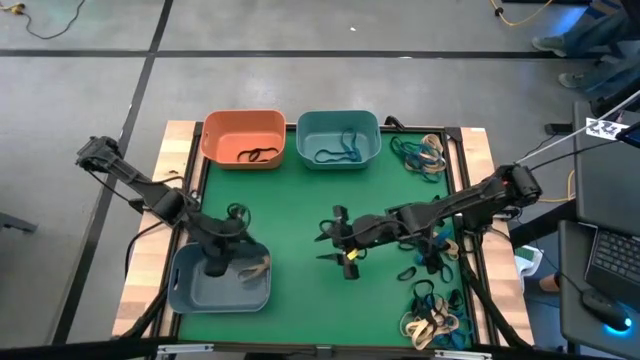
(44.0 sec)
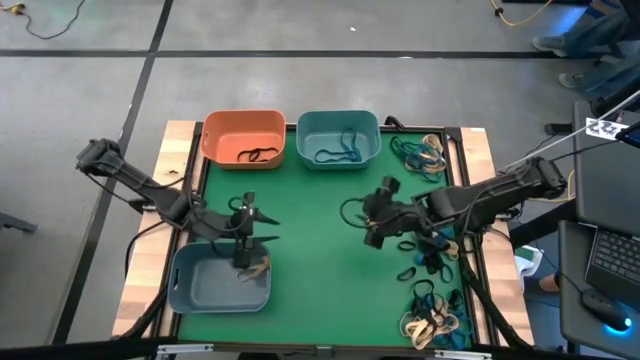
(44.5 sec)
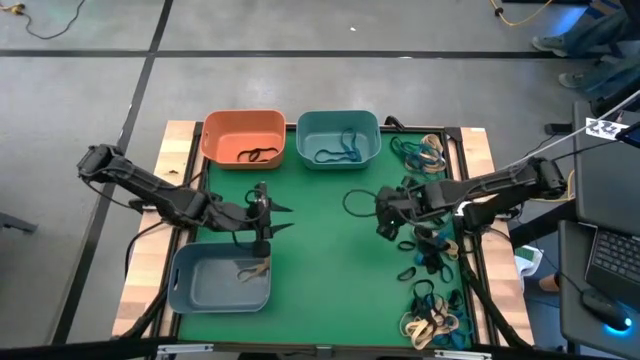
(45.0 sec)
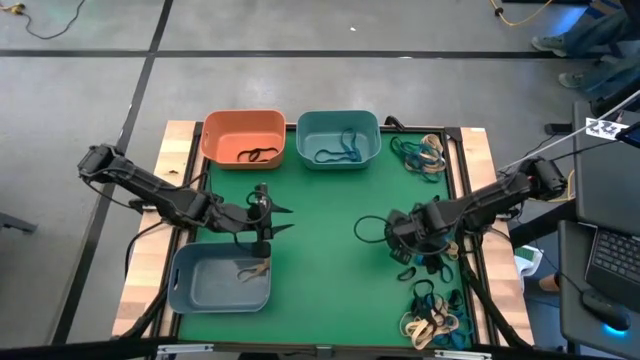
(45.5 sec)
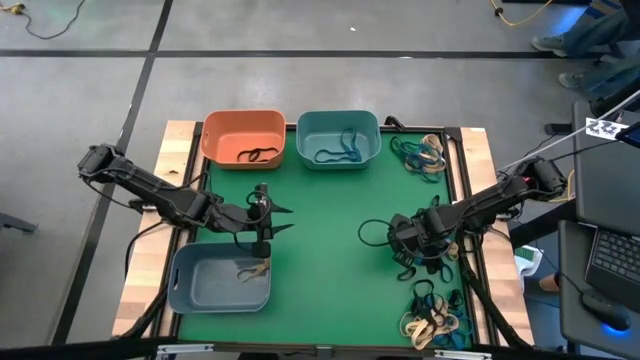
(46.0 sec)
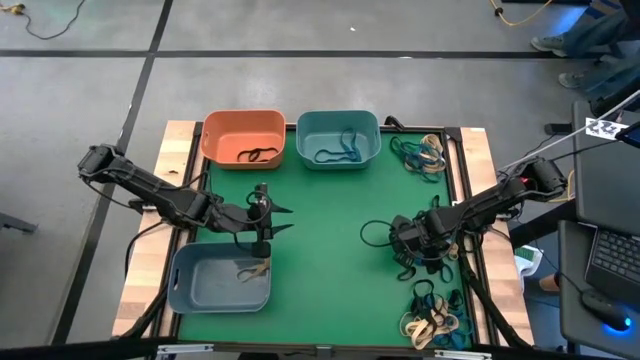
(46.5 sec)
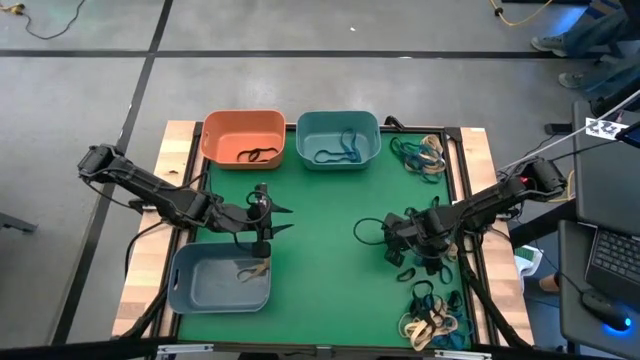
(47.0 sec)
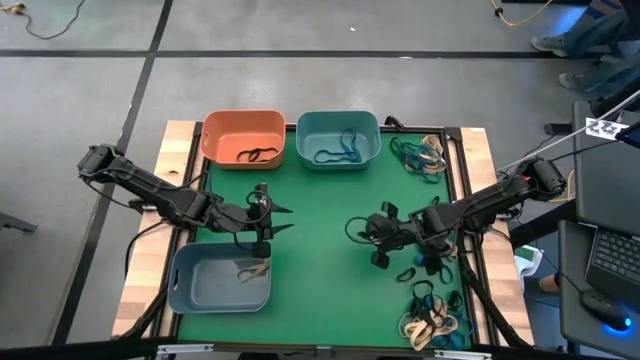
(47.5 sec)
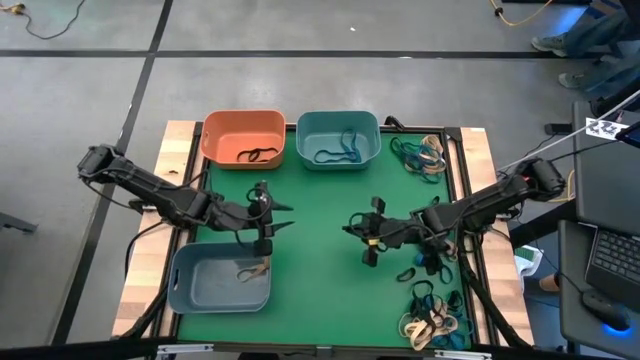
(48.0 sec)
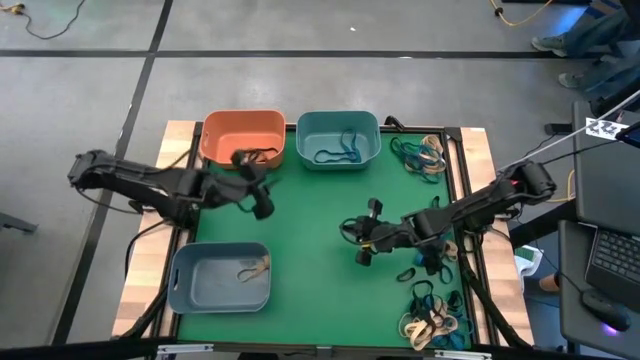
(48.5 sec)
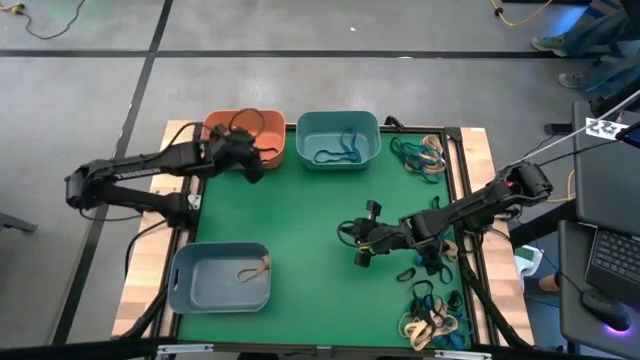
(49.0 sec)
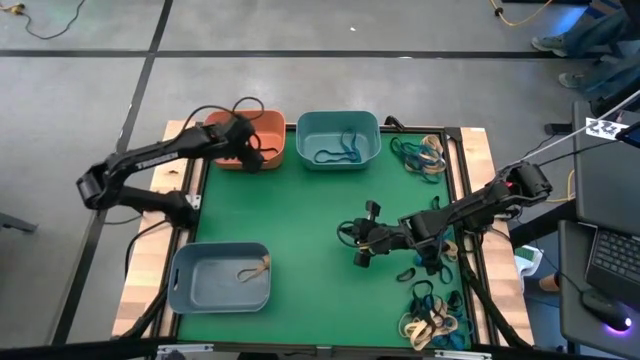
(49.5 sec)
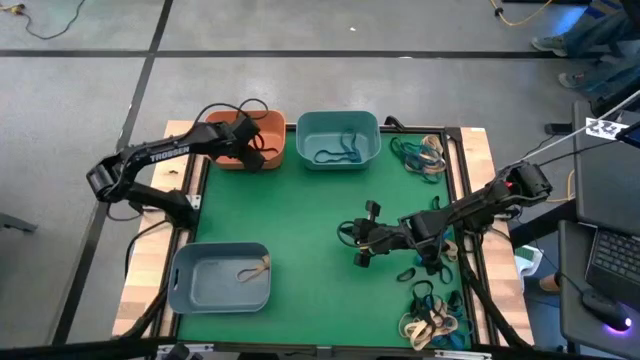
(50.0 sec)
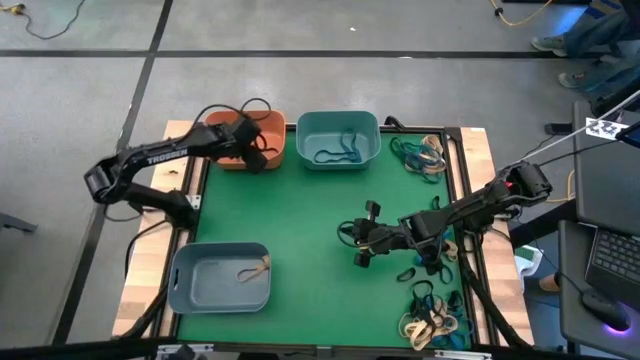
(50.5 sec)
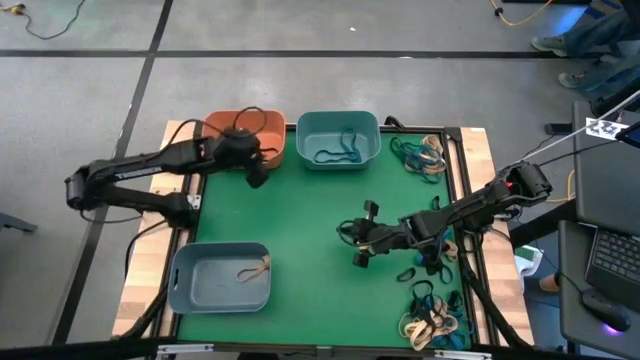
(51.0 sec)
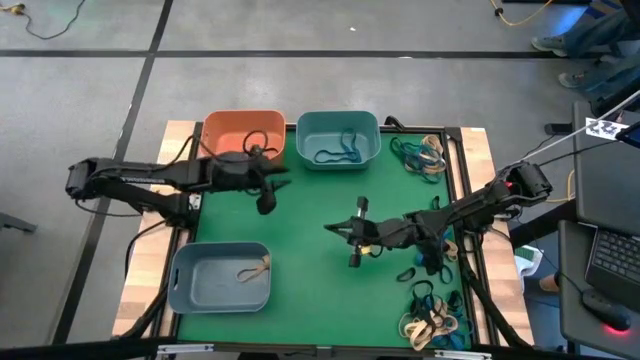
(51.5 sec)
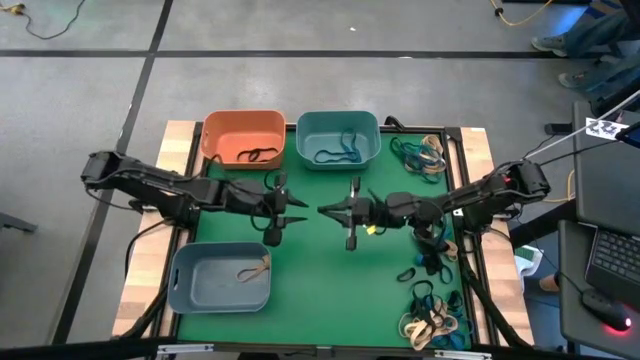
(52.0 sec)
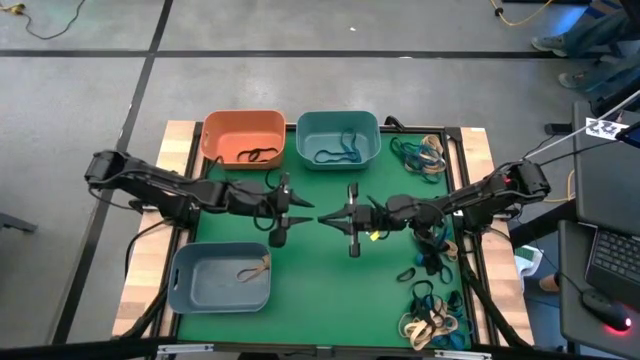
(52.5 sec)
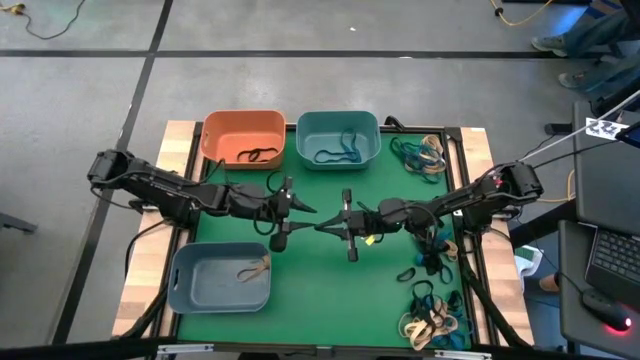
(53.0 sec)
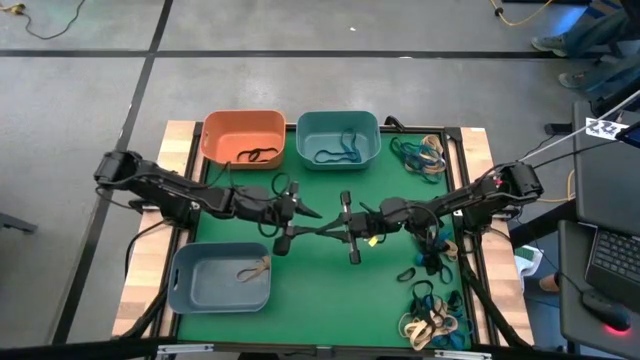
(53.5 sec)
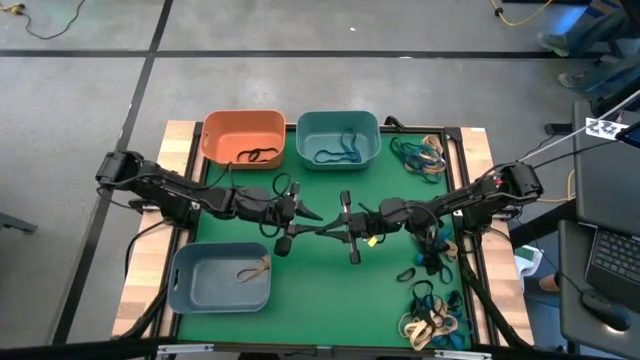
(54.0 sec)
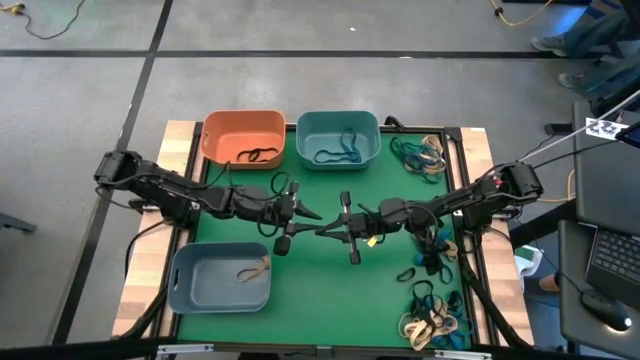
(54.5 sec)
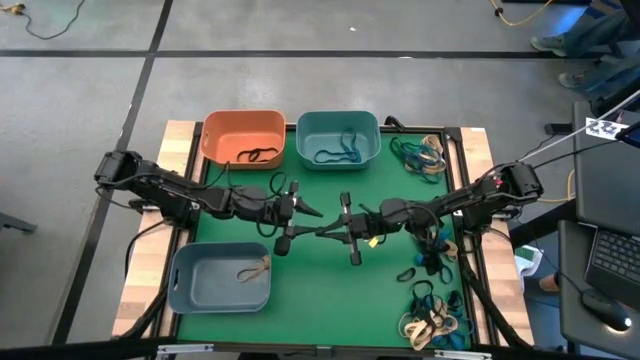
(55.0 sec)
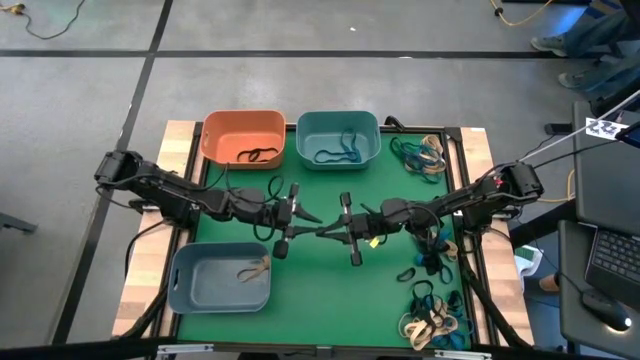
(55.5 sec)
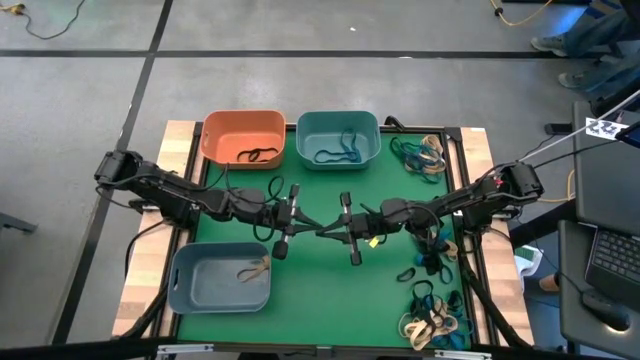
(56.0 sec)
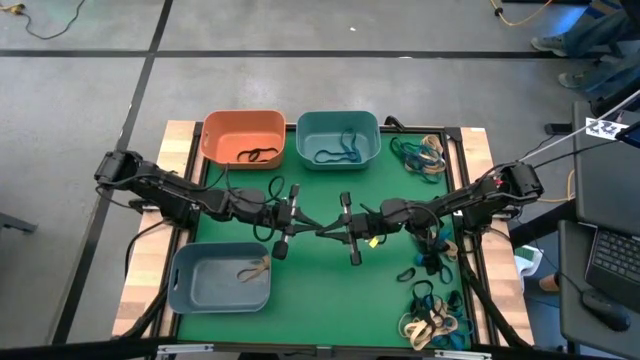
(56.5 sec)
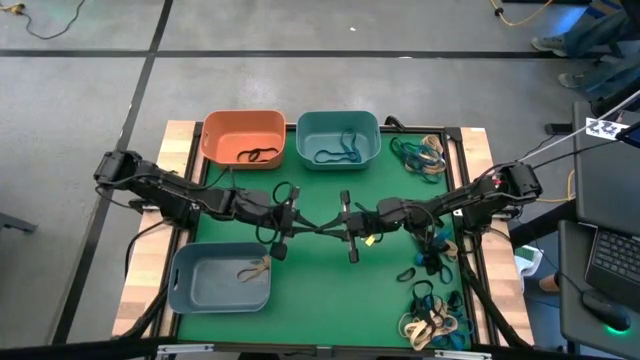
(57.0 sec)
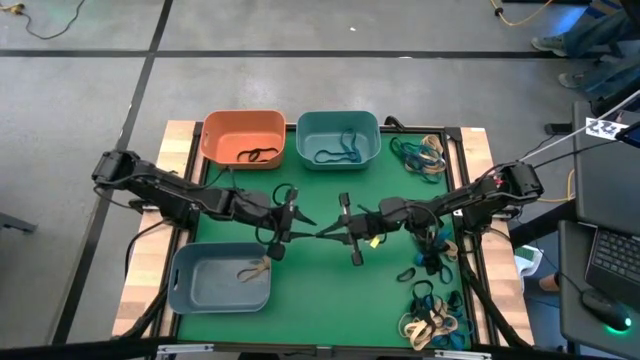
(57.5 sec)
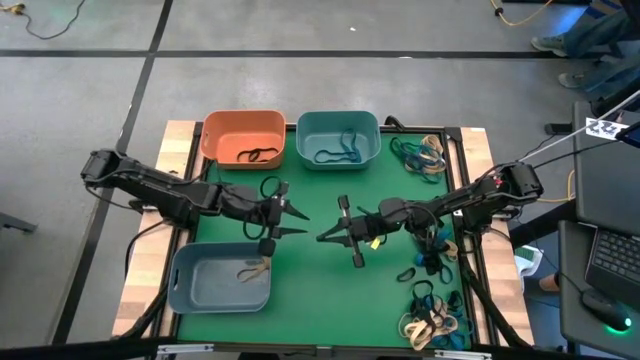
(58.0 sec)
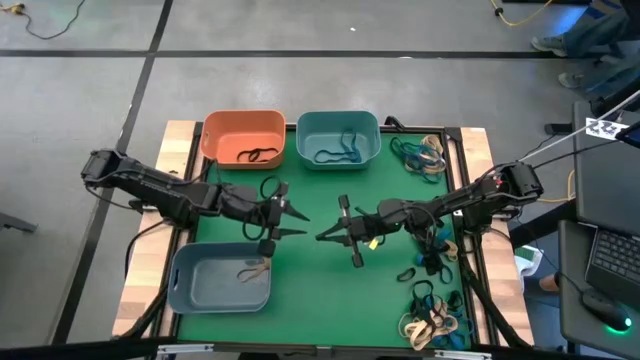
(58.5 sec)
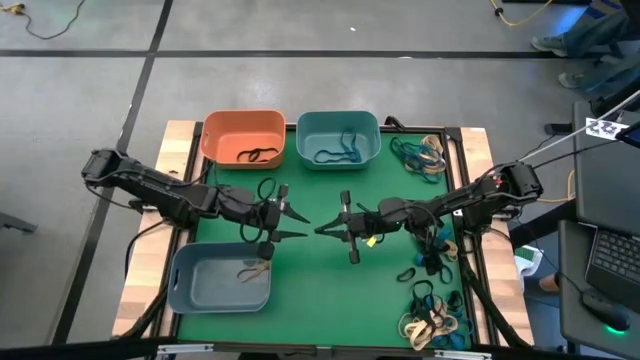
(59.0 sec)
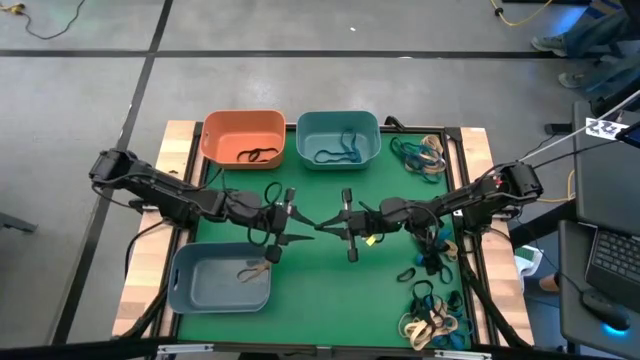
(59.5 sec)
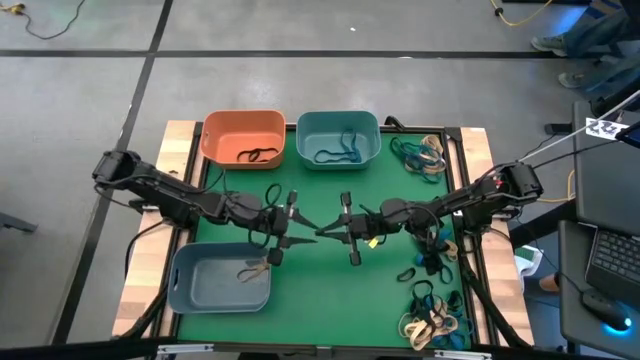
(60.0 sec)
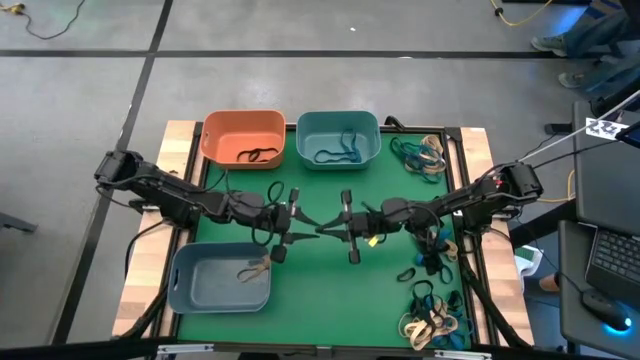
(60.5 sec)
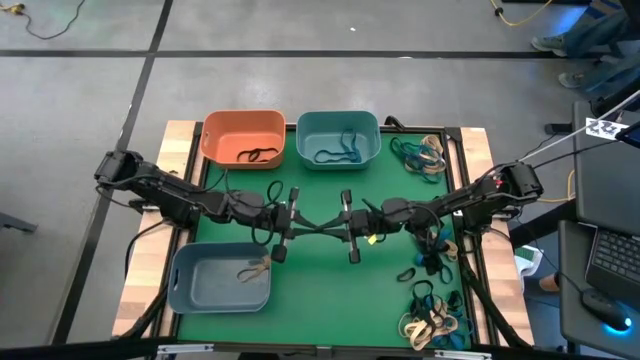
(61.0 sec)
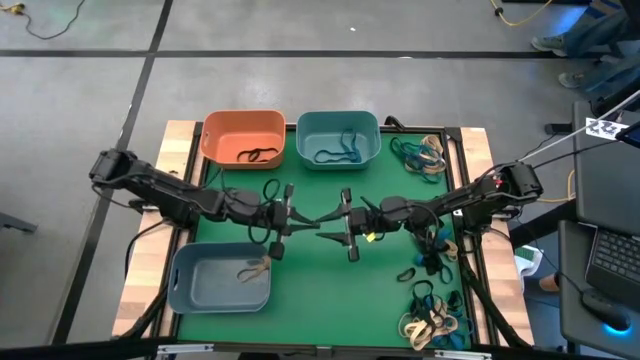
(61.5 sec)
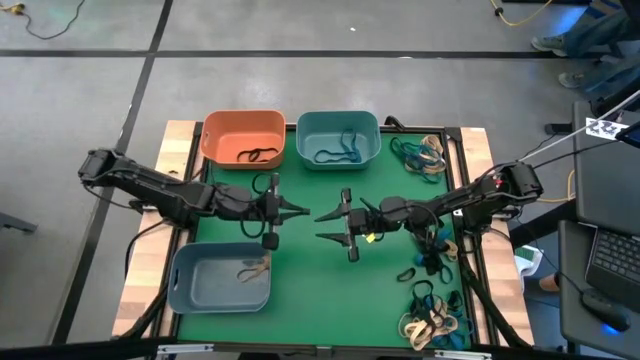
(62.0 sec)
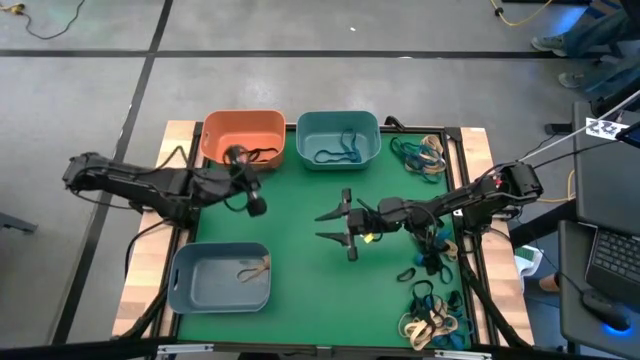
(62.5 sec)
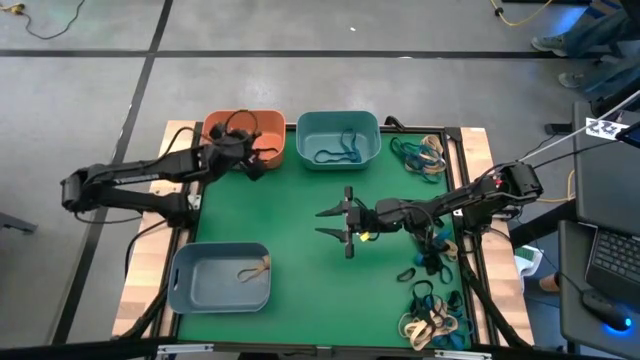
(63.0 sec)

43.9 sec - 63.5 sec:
Task: Sort rubber bands into baskets
Put the small black rubber band into the orange bin

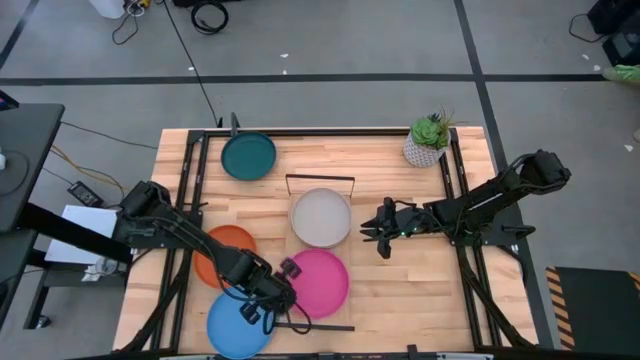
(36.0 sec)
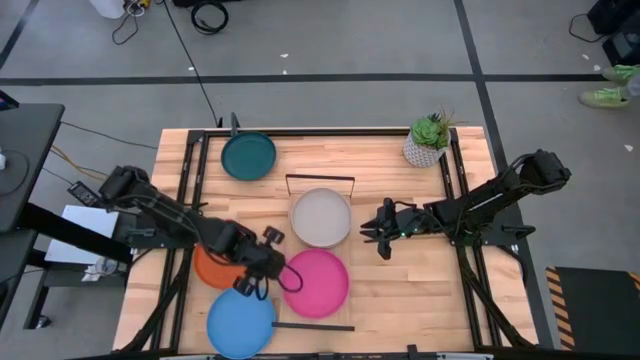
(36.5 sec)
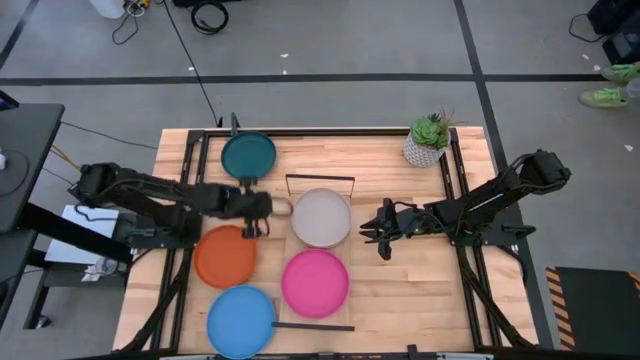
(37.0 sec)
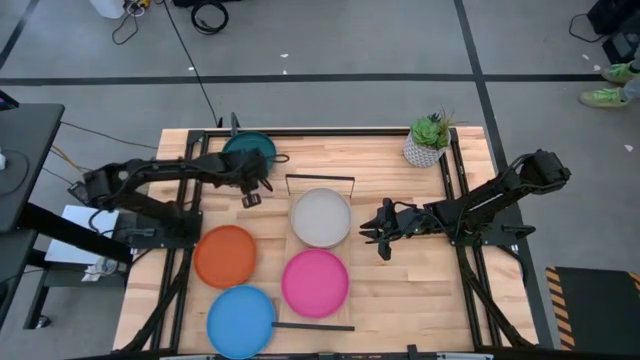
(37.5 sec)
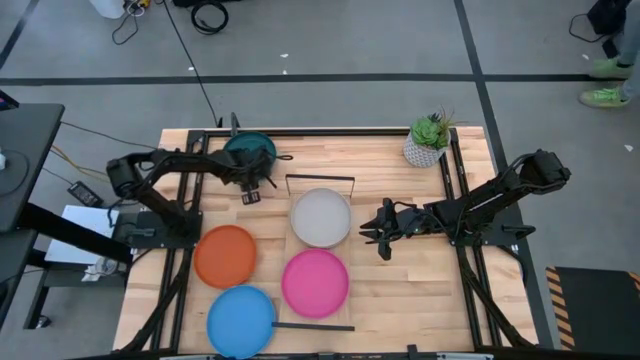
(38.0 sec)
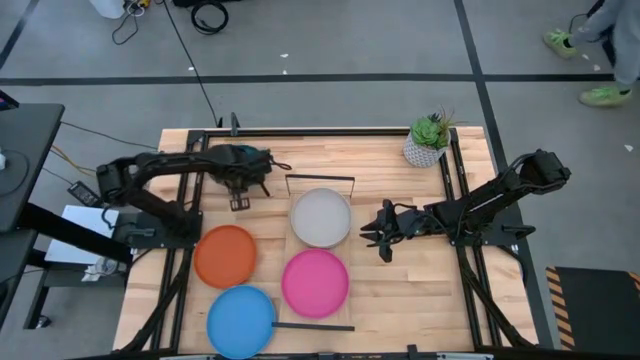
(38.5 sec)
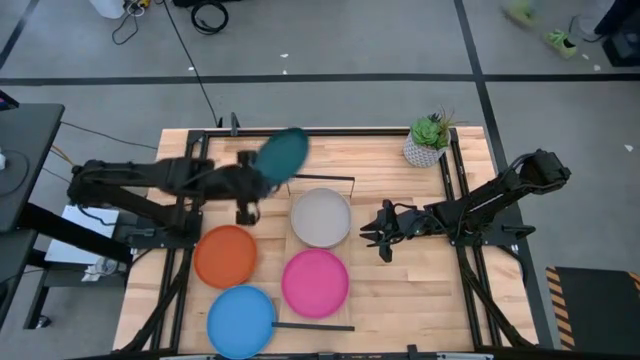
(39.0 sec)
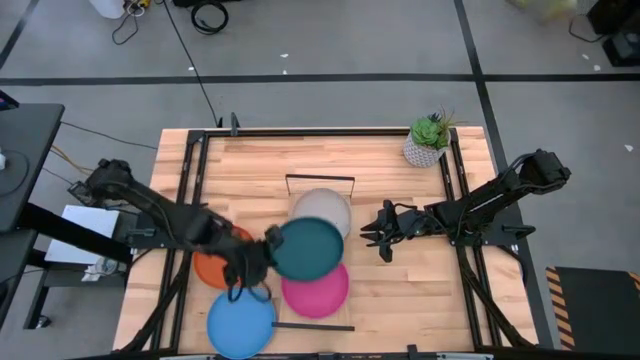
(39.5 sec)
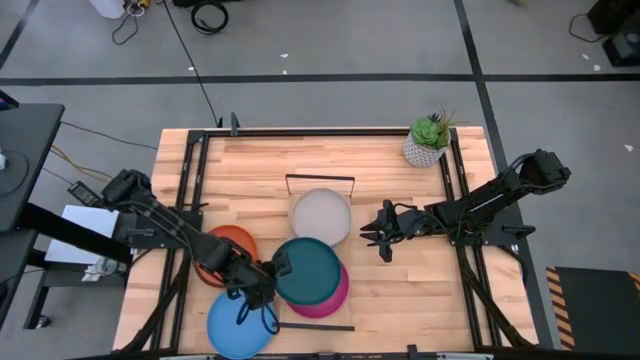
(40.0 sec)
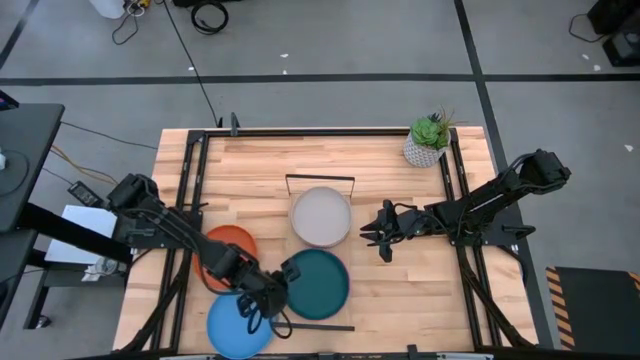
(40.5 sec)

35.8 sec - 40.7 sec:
Task: Place and stack plates onto a shelf
Stack the dark blue plate on top of the pink plate on the shelf
